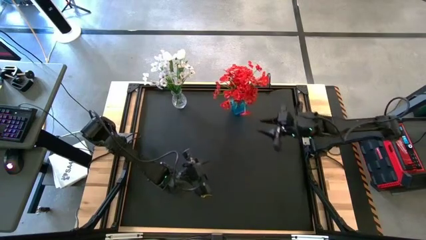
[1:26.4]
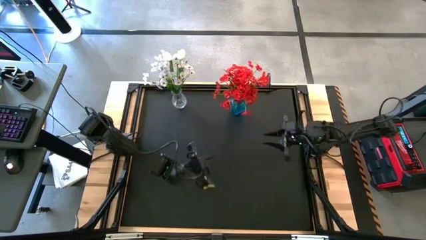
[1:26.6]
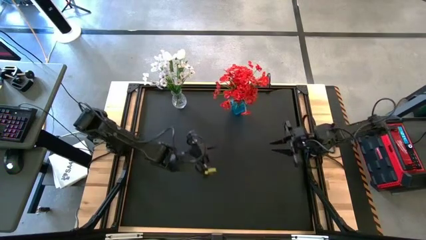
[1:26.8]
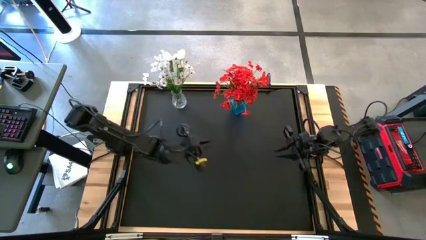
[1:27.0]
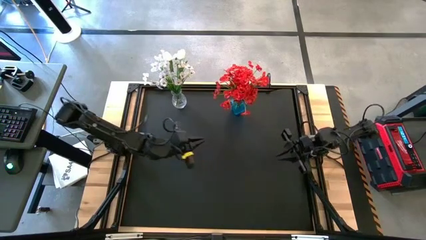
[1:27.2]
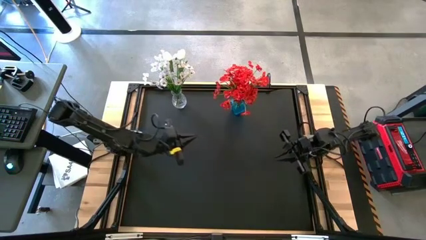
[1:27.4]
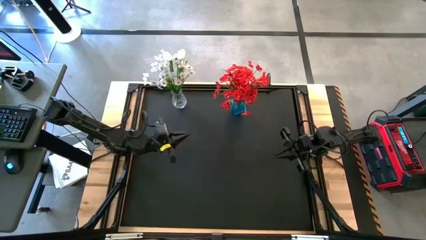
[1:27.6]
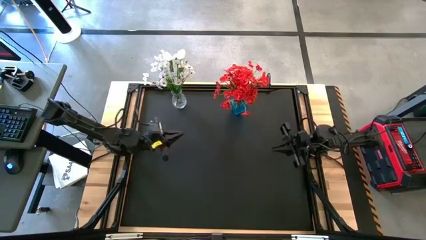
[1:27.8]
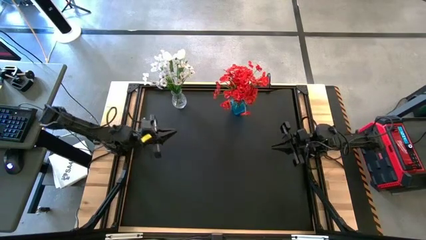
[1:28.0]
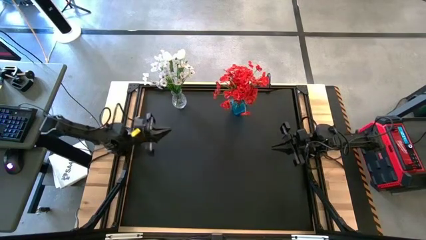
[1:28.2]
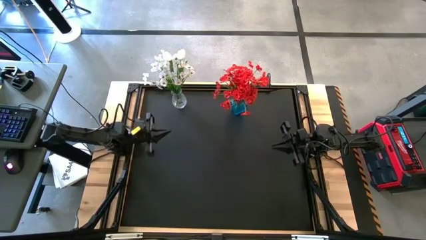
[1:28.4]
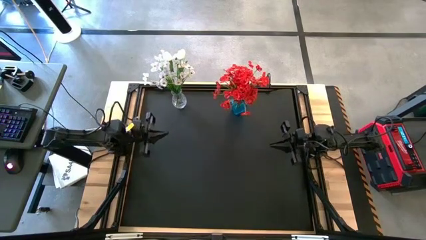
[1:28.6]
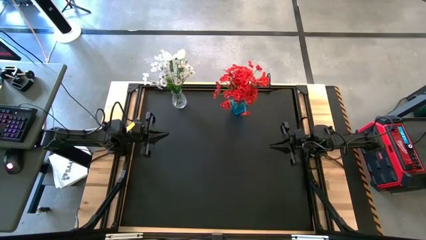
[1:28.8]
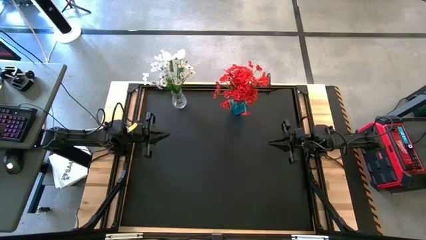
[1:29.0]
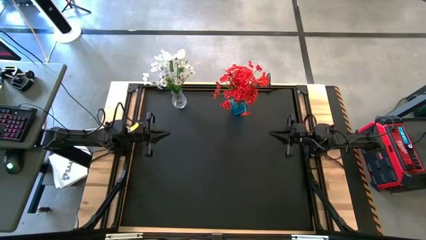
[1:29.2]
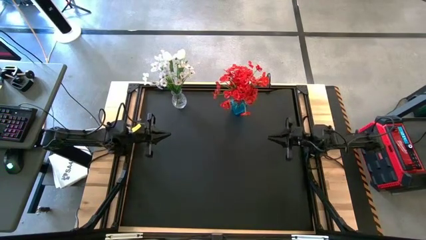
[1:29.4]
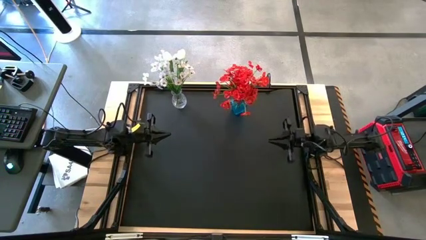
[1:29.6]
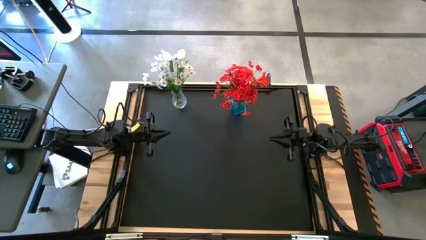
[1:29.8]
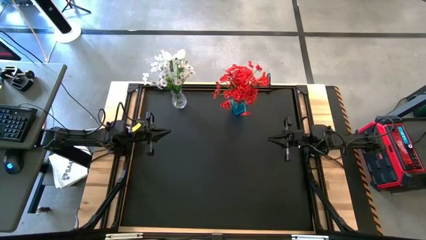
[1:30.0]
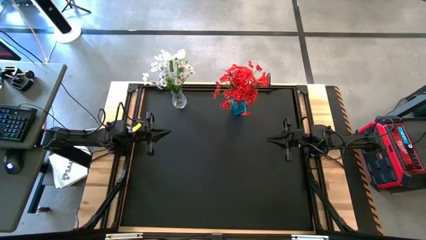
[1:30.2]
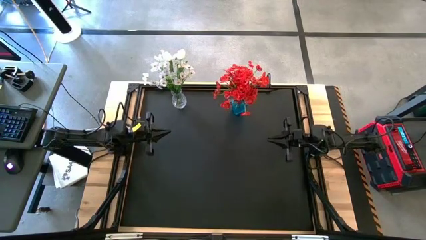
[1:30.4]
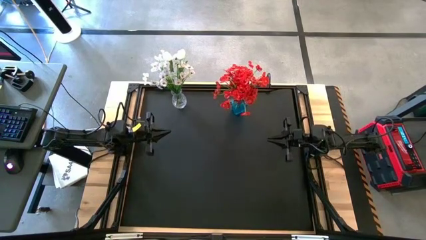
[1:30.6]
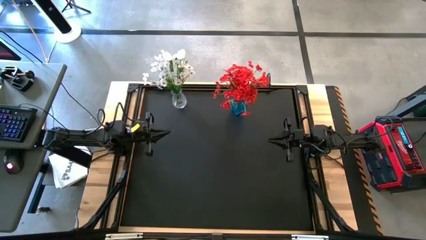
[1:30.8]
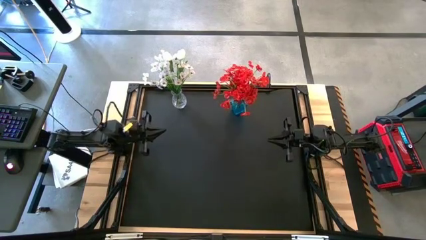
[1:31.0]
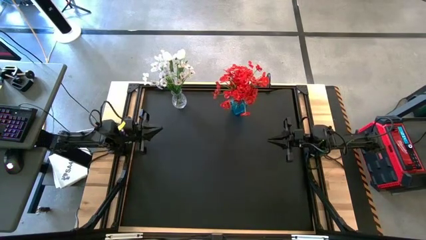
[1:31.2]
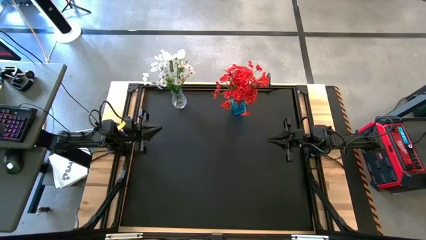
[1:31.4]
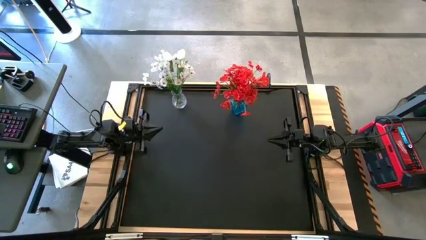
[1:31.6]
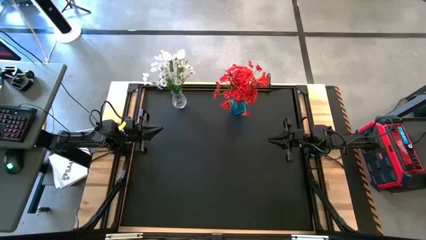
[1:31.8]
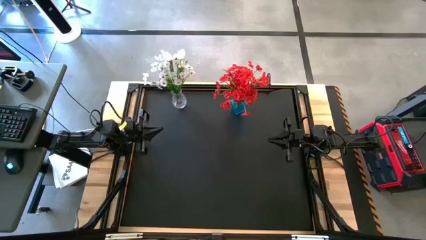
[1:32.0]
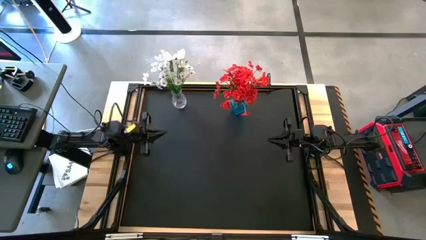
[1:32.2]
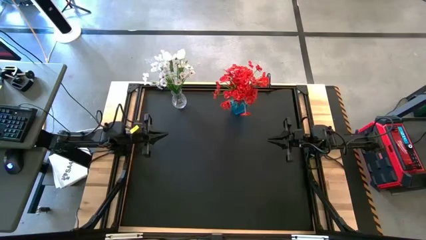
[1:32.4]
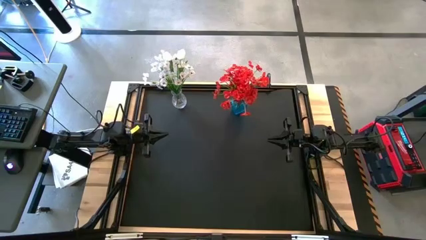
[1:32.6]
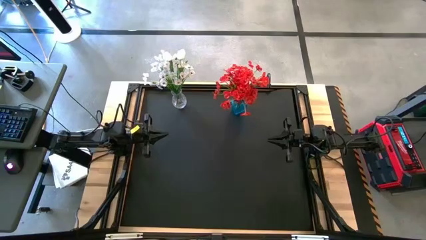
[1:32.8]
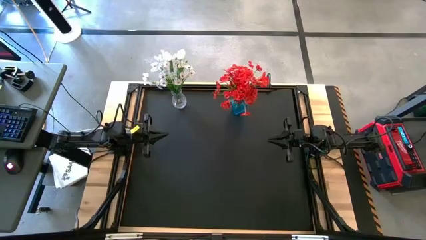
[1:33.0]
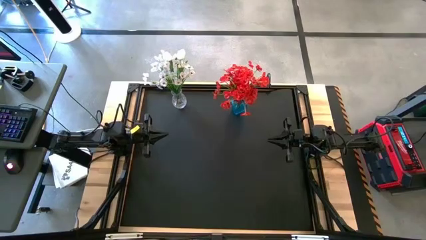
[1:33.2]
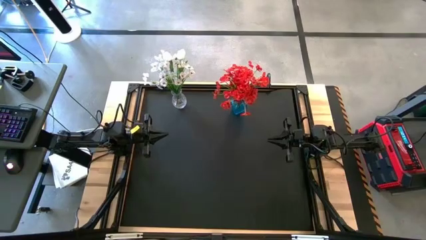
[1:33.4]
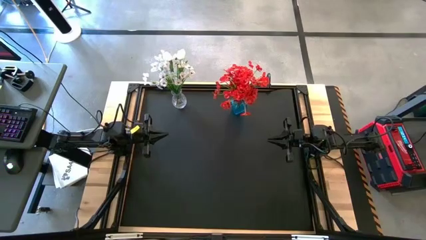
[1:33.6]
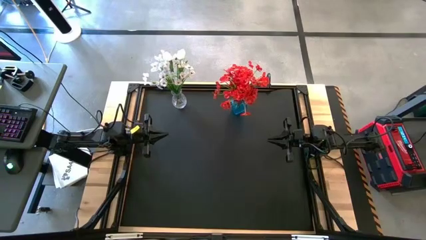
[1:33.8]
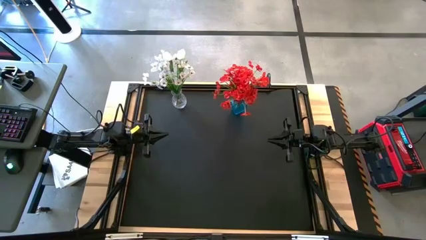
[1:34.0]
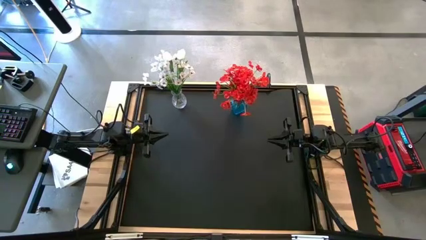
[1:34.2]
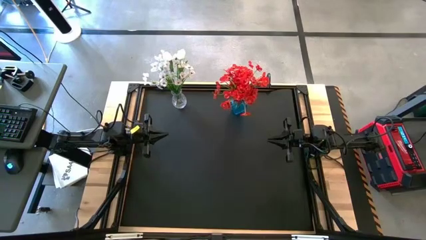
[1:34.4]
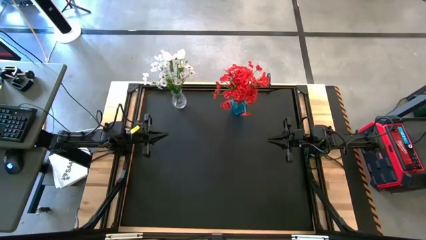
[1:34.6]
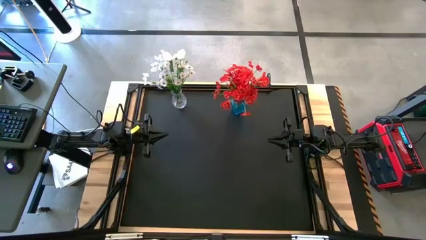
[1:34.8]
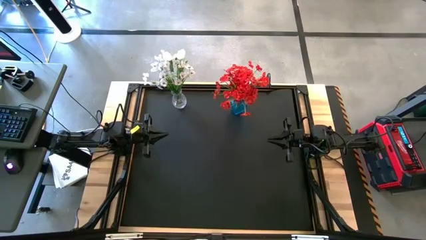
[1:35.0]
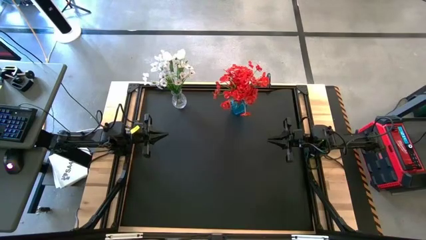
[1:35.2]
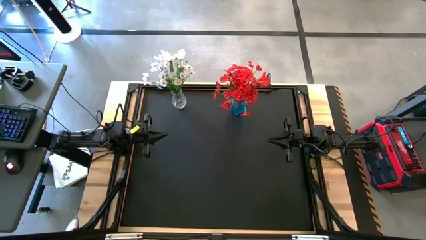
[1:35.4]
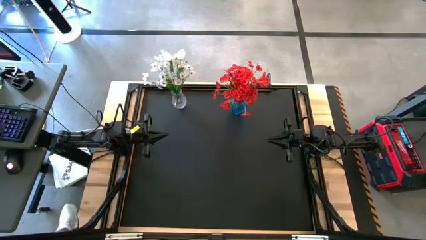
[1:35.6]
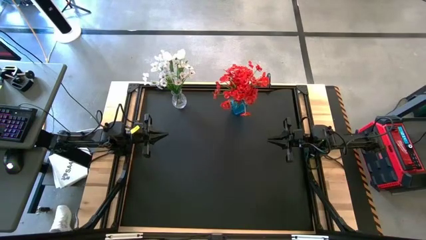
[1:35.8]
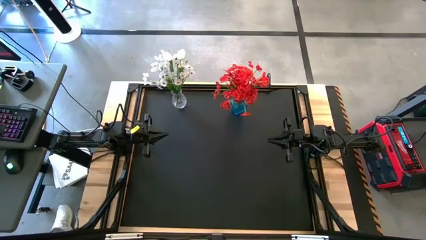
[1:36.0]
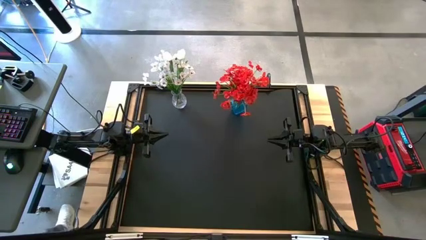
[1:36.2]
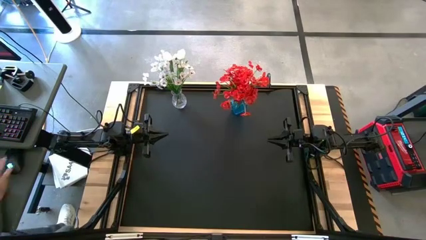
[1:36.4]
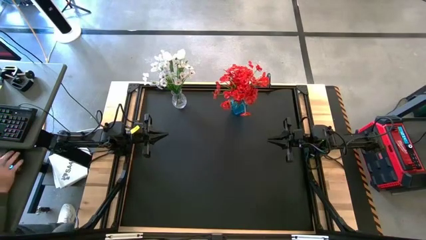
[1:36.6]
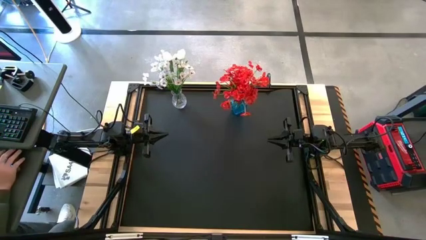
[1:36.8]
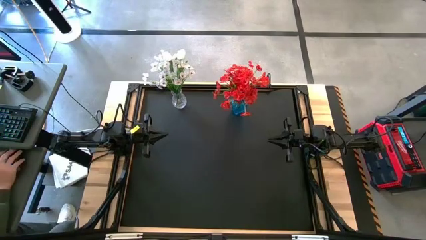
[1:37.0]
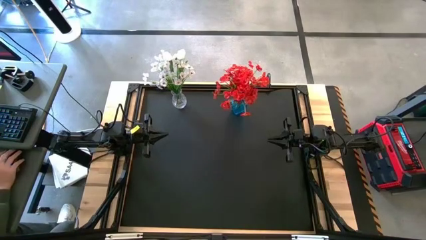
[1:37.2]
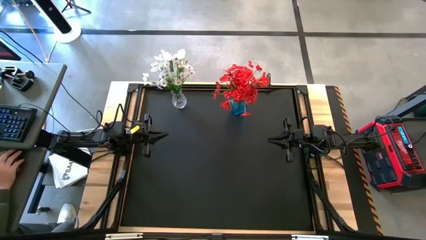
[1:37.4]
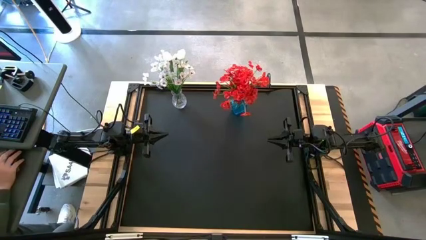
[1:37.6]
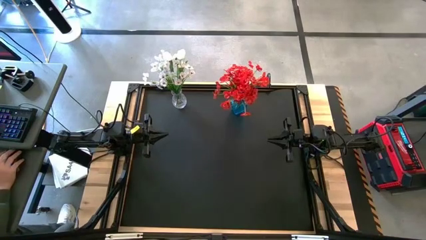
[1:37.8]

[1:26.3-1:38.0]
Task: Sort flowers into vase by color
Return to Home Position

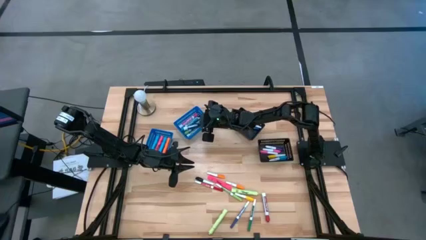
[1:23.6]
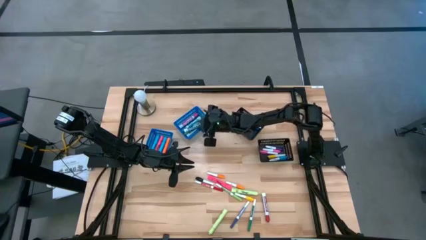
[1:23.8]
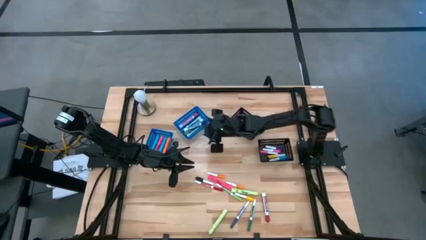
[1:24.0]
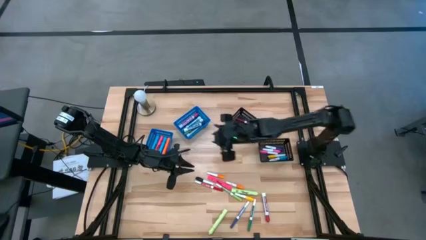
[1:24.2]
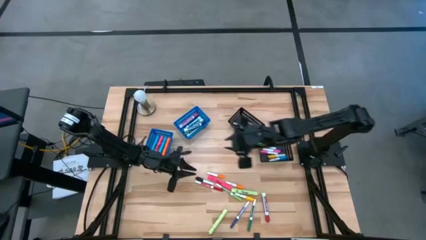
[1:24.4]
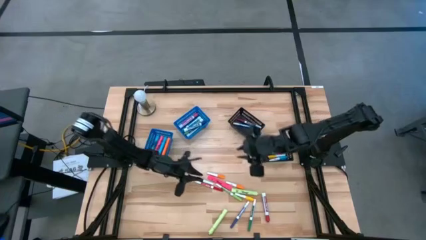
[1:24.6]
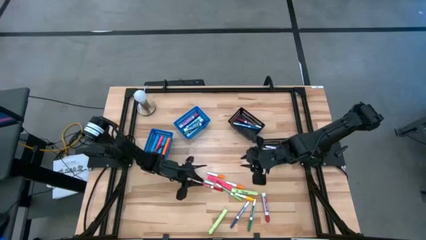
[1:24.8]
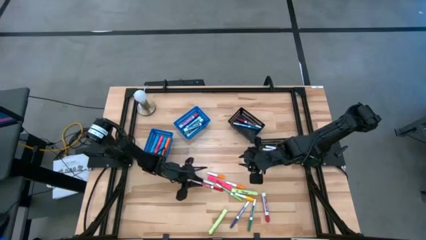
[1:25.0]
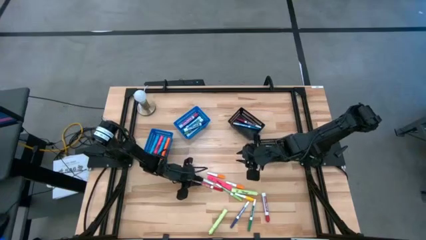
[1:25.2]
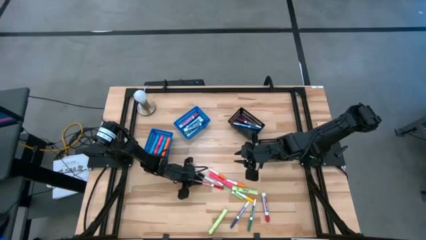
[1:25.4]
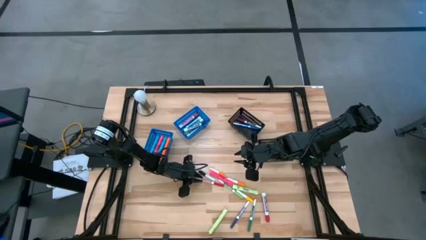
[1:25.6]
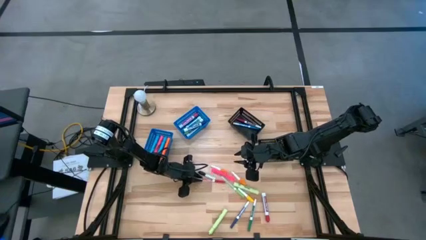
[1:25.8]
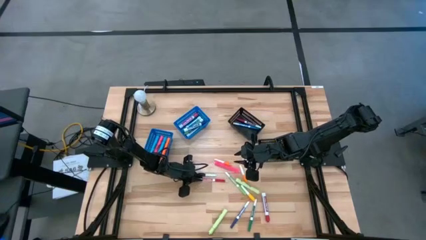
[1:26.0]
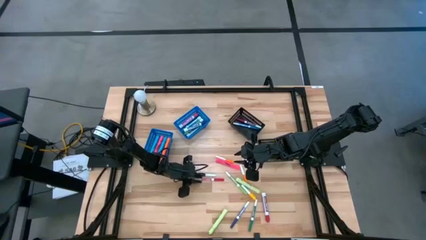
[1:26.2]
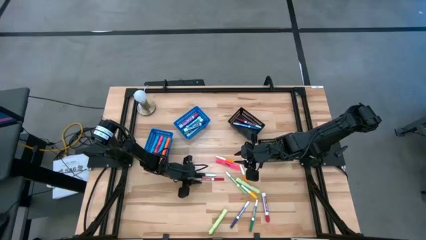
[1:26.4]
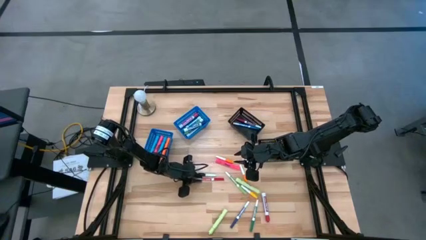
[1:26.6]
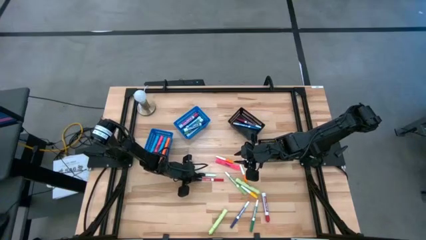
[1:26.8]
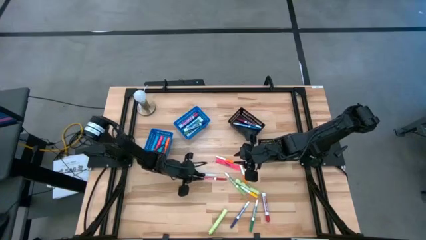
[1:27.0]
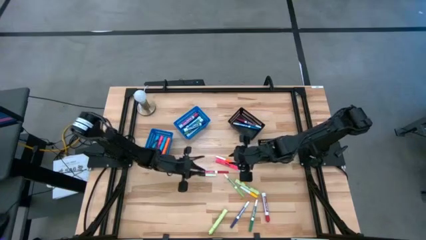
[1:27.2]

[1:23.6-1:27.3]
Task: Pick & Place Markers
Put the red marker pen into the top black bin

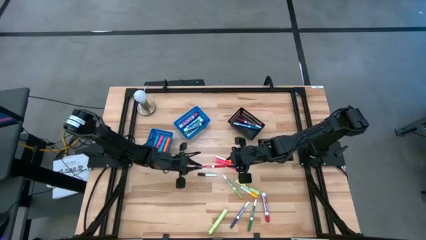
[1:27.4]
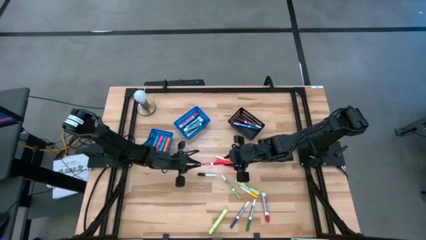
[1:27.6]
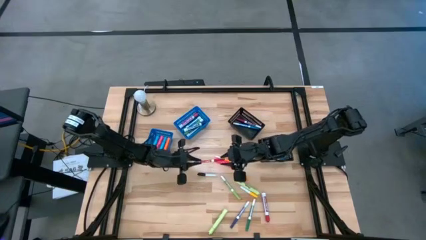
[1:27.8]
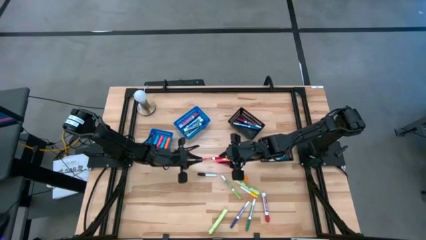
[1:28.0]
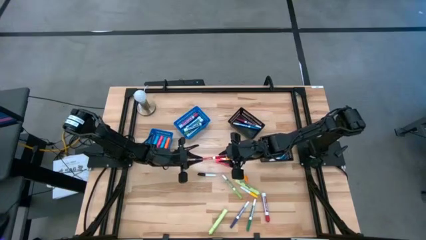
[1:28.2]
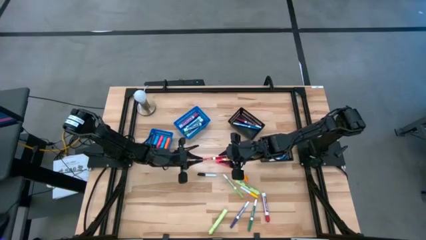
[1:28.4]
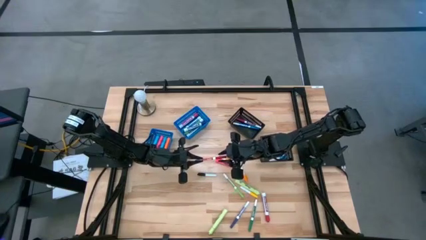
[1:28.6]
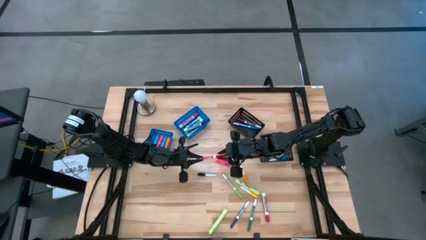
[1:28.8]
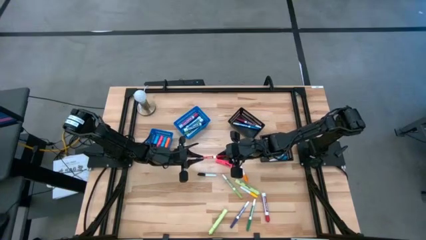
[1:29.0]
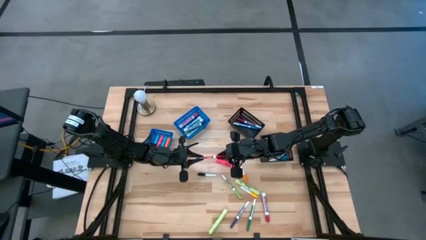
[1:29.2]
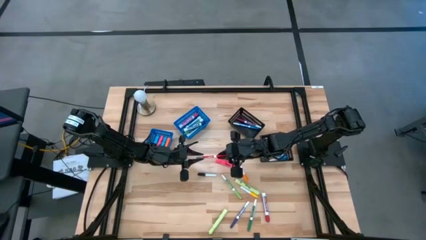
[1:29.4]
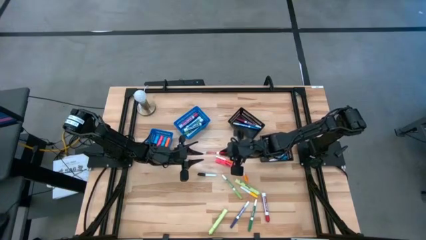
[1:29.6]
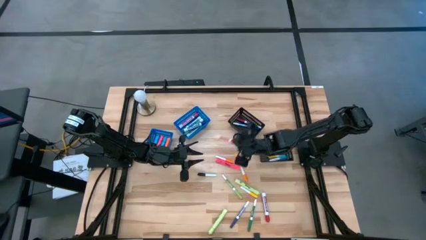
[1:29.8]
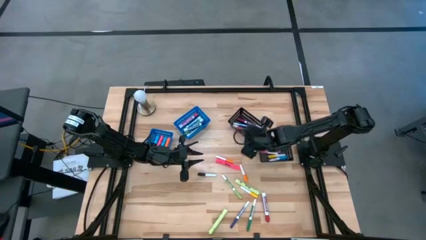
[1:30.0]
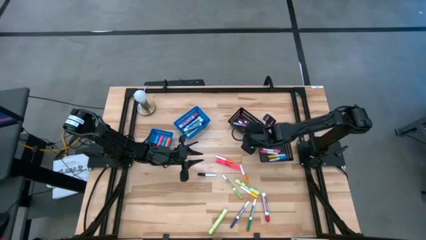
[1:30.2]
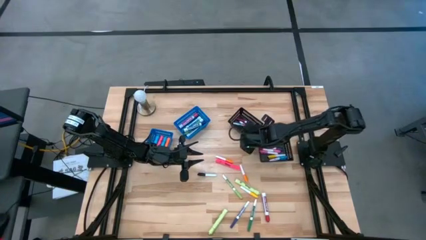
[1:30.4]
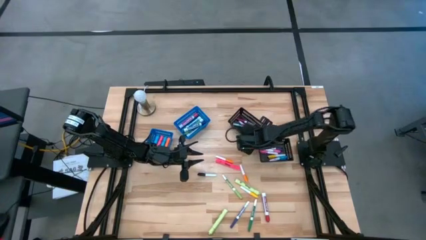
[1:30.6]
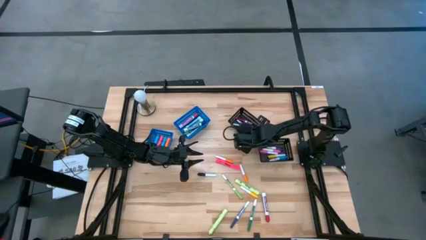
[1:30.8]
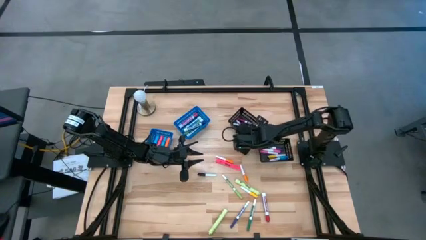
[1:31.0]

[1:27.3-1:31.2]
Put the red marker pen into the top black bin
